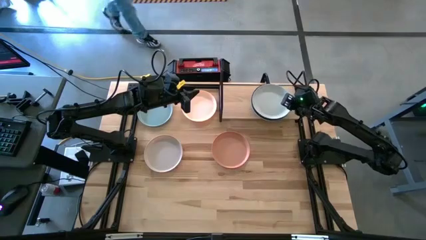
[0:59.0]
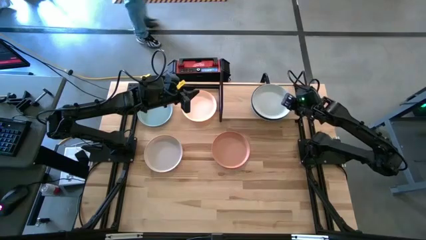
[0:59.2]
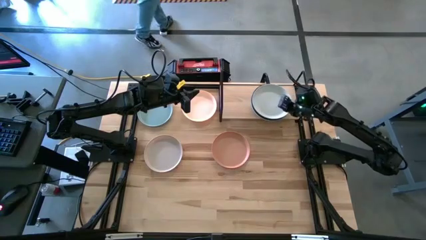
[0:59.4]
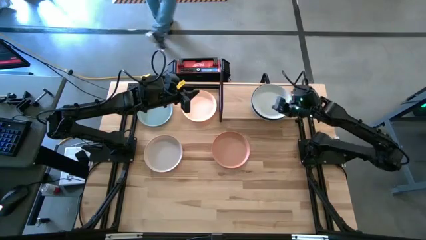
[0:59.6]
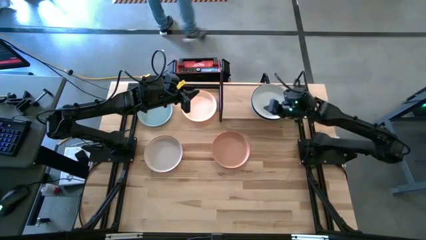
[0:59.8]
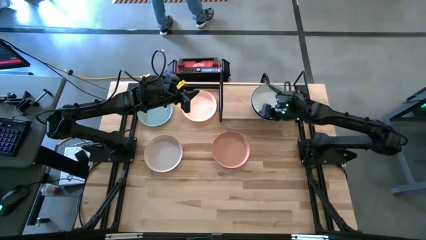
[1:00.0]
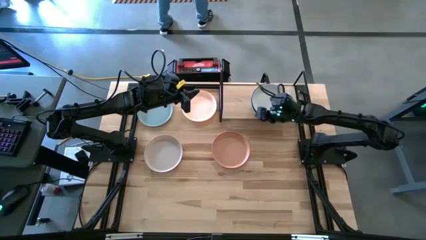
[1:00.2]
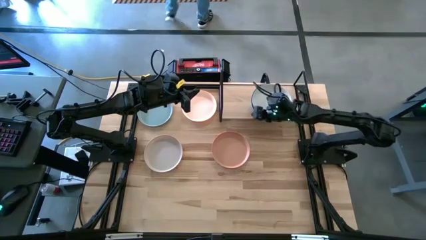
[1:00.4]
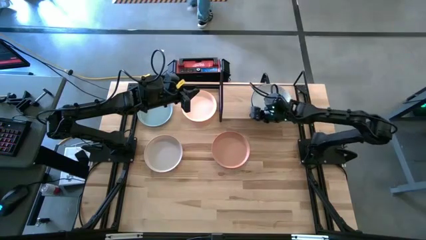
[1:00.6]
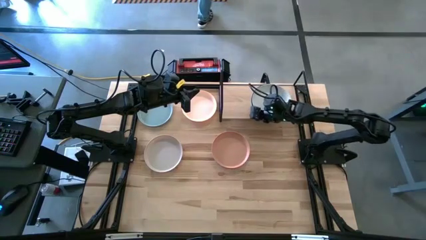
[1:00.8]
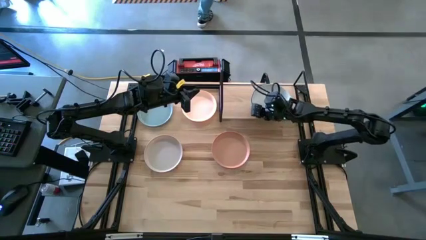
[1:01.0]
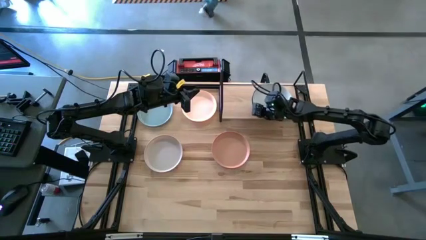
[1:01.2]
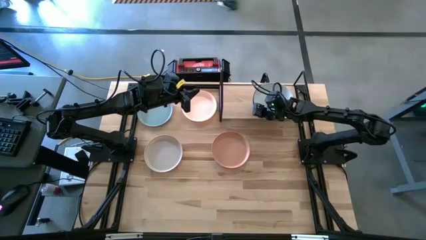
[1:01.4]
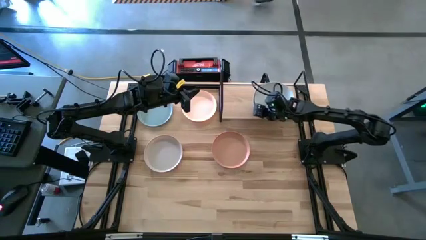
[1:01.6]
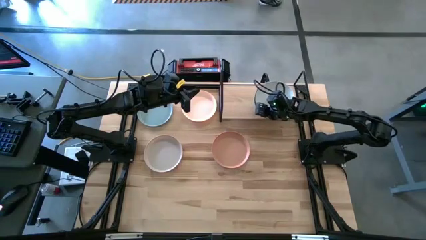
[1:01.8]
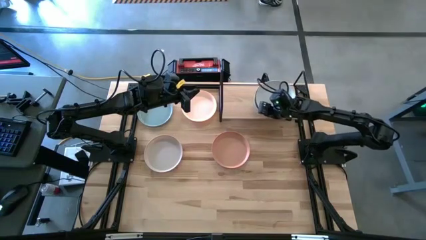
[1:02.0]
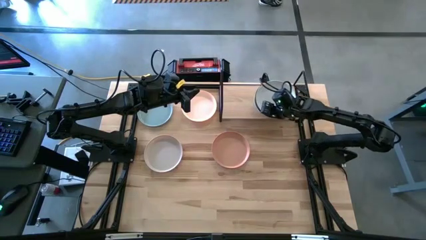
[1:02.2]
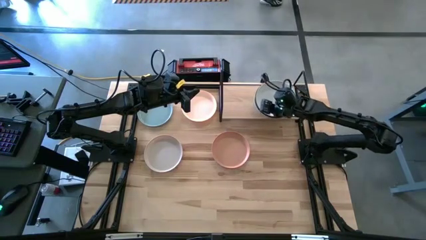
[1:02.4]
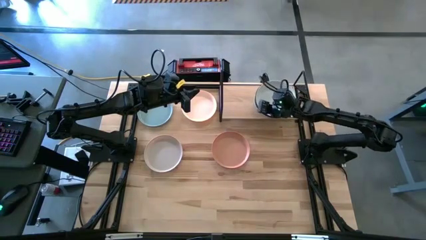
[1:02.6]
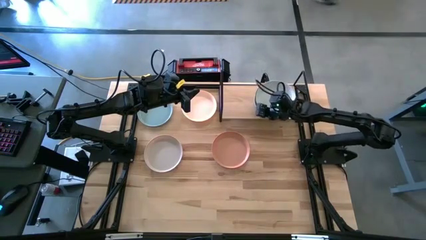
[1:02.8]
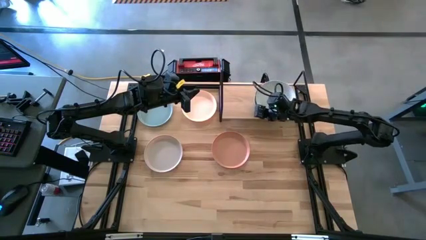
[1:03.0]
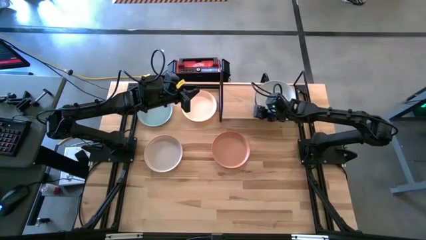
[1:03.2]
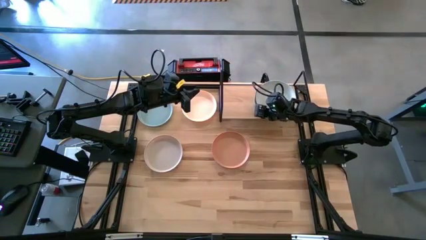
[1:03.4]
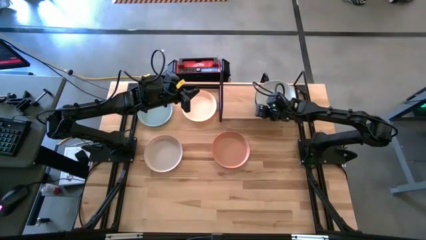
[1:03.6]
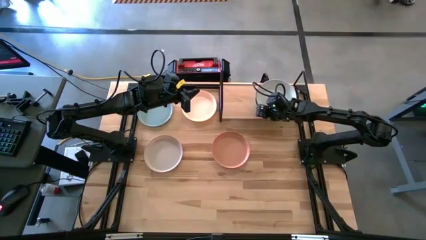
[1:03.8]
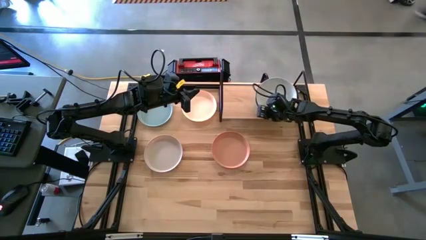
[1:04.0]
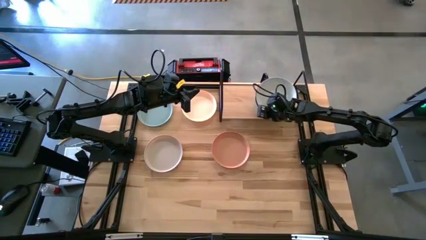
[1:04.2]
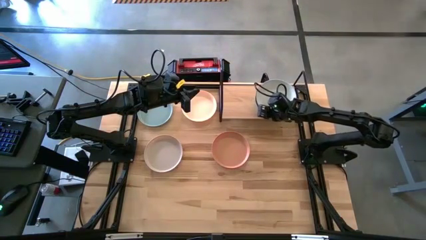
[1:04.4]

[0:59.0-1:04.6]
Task: Place and stack plates onto a shelf
Adjust the plates on the shelf

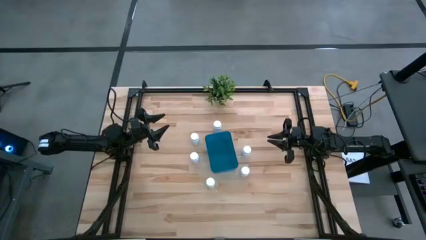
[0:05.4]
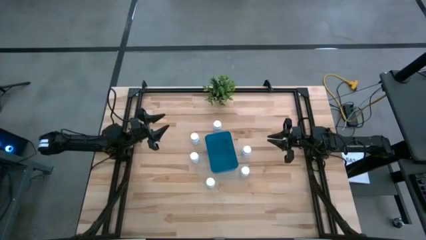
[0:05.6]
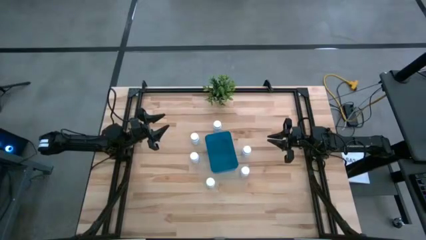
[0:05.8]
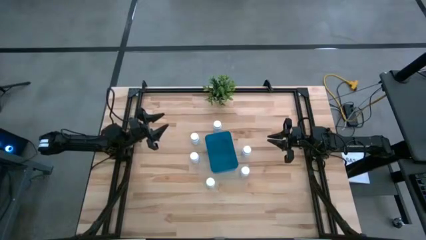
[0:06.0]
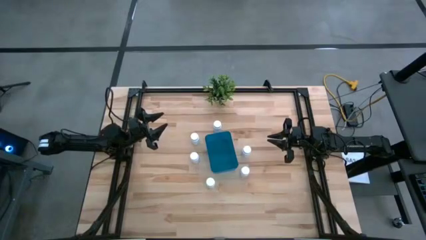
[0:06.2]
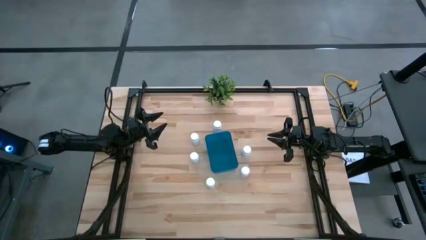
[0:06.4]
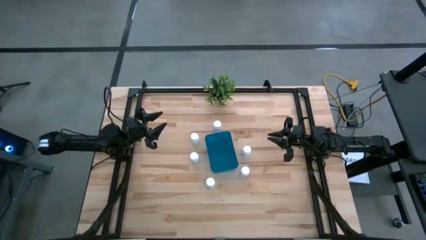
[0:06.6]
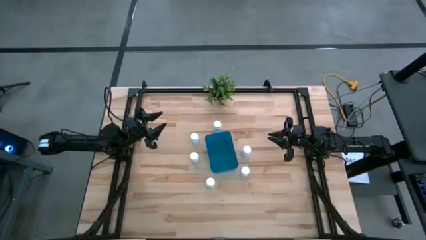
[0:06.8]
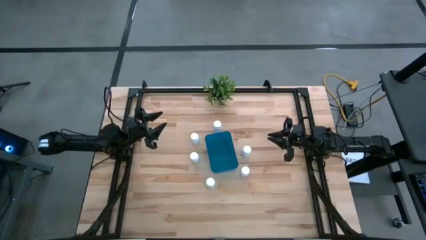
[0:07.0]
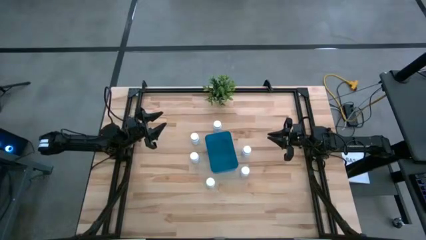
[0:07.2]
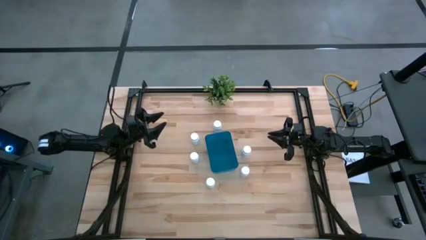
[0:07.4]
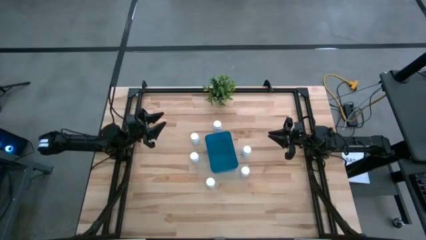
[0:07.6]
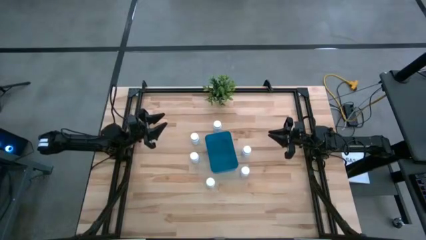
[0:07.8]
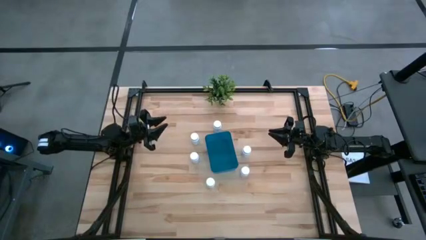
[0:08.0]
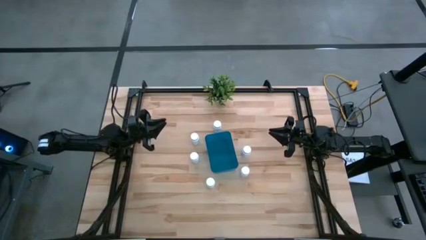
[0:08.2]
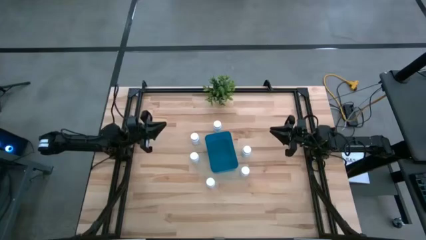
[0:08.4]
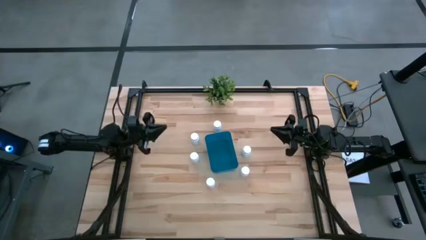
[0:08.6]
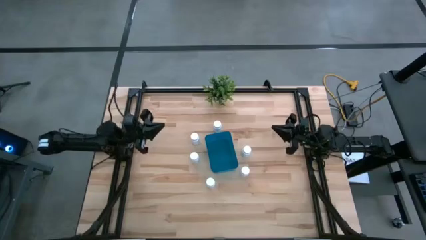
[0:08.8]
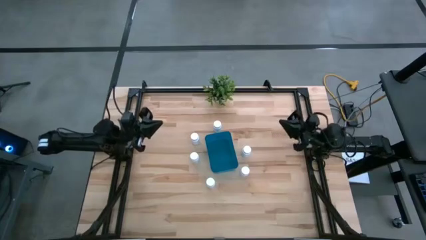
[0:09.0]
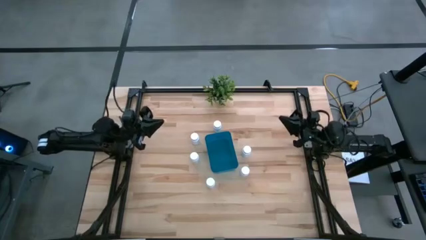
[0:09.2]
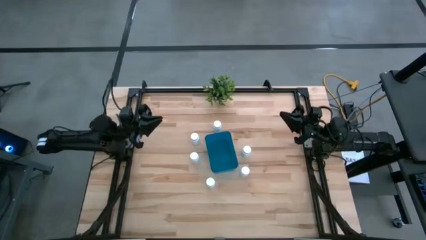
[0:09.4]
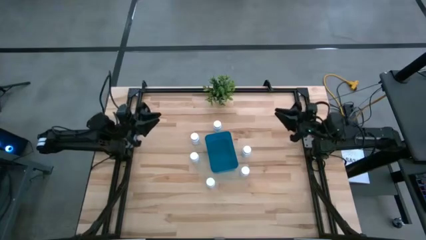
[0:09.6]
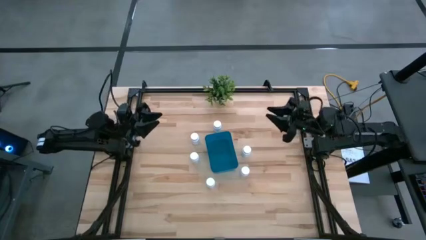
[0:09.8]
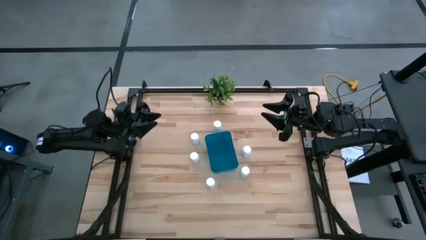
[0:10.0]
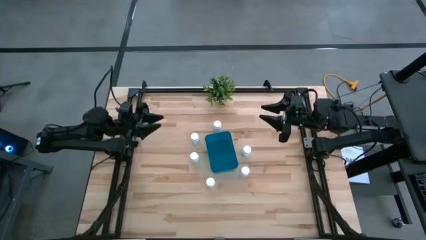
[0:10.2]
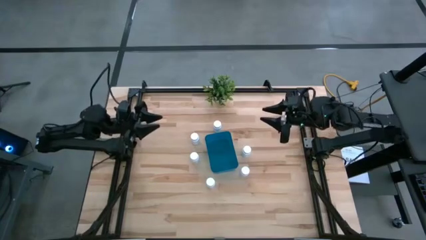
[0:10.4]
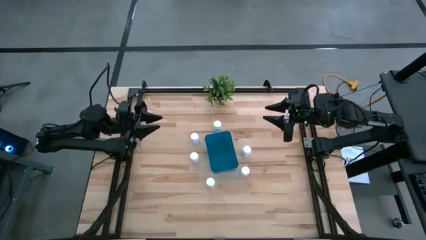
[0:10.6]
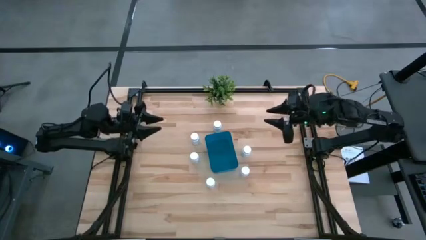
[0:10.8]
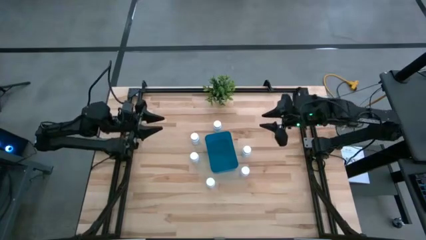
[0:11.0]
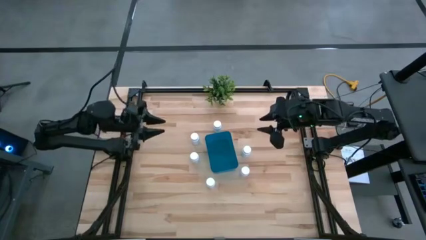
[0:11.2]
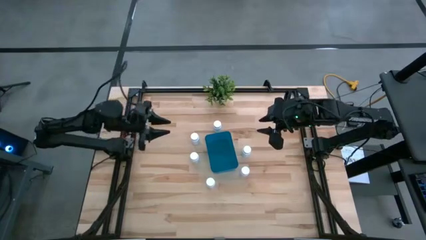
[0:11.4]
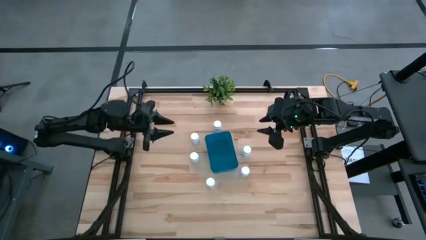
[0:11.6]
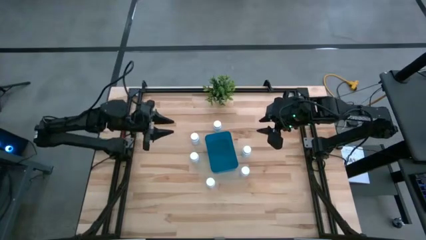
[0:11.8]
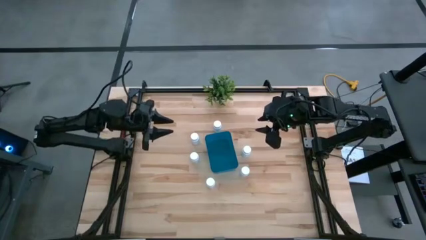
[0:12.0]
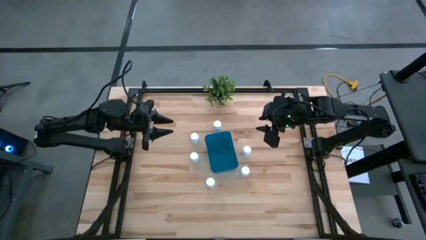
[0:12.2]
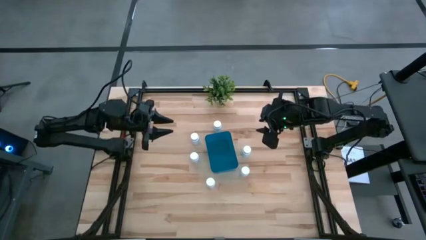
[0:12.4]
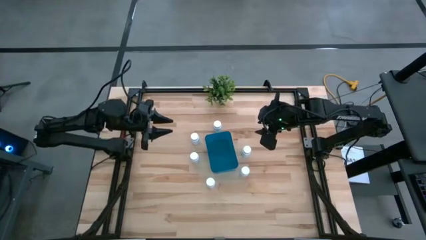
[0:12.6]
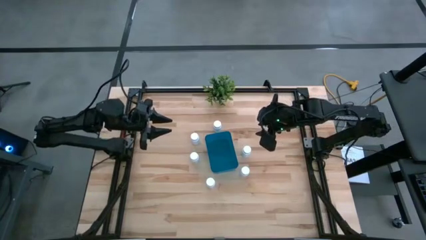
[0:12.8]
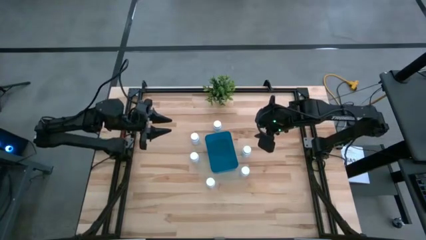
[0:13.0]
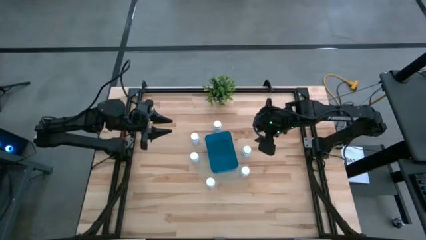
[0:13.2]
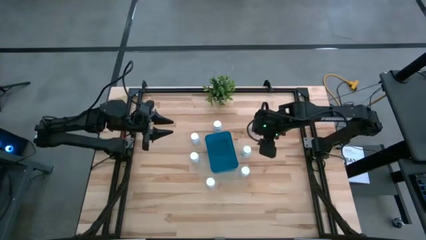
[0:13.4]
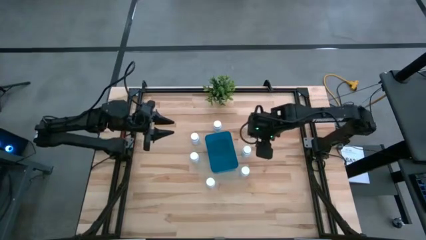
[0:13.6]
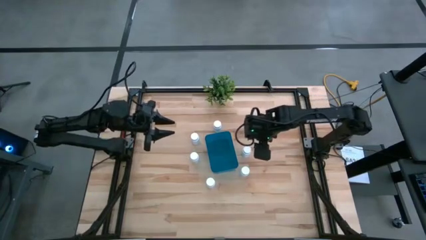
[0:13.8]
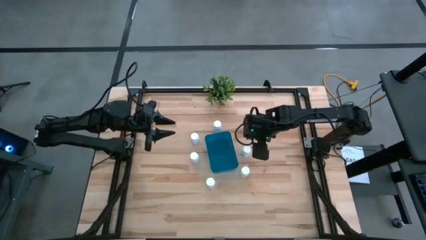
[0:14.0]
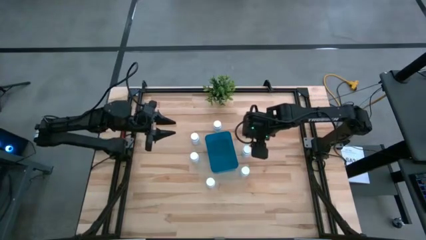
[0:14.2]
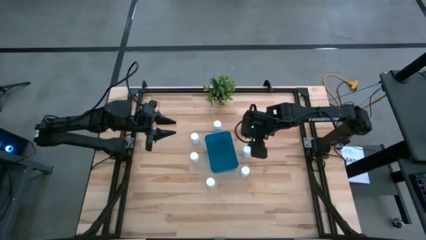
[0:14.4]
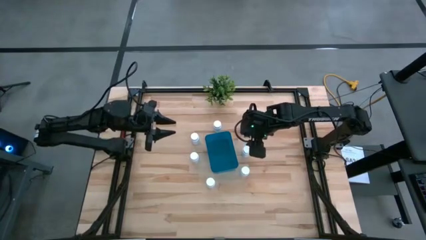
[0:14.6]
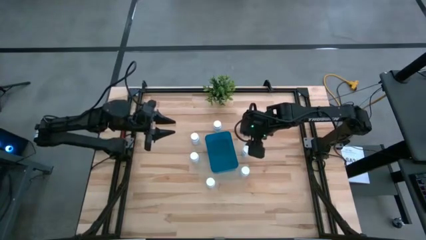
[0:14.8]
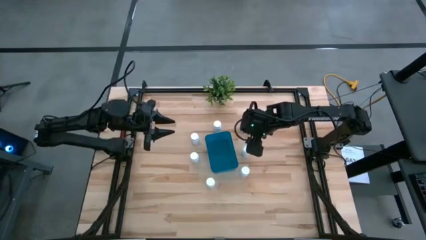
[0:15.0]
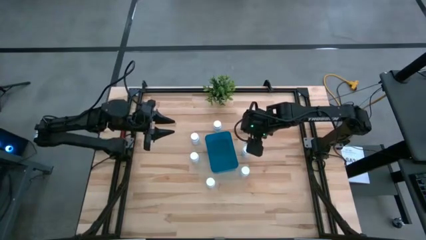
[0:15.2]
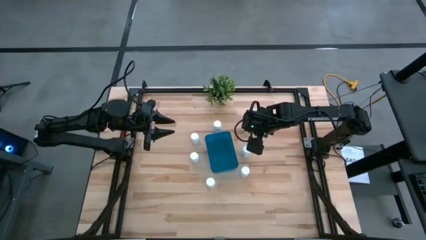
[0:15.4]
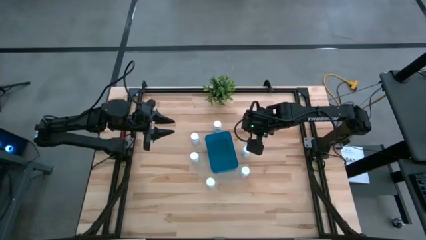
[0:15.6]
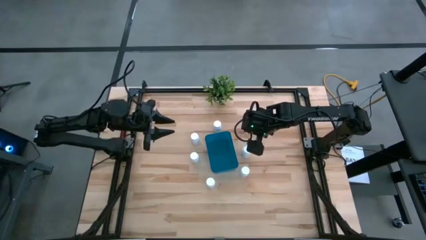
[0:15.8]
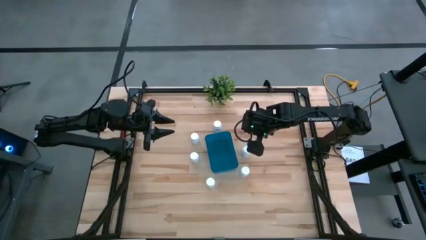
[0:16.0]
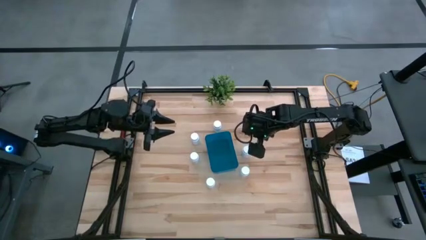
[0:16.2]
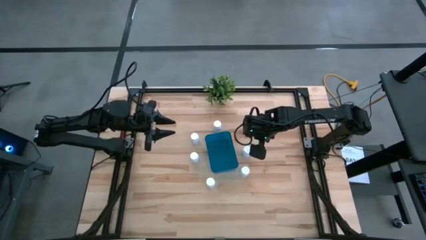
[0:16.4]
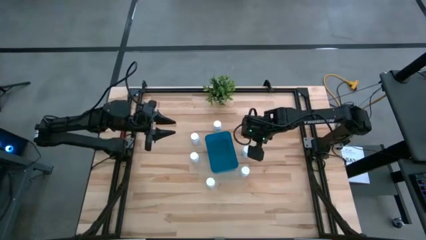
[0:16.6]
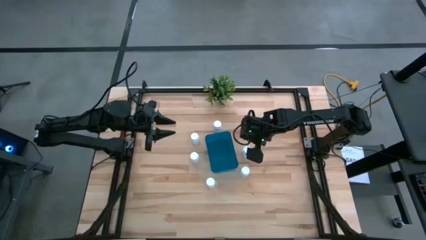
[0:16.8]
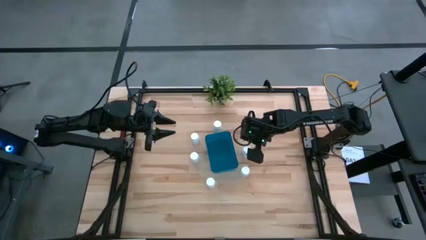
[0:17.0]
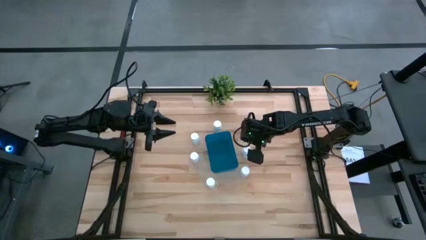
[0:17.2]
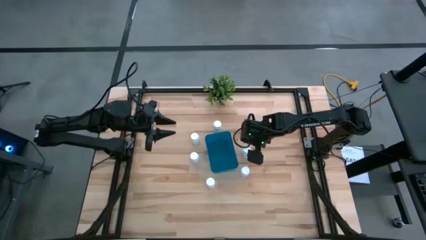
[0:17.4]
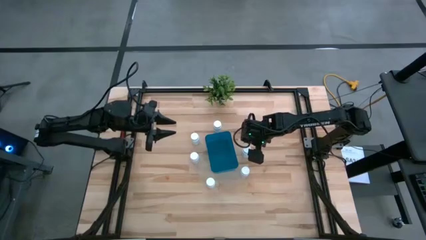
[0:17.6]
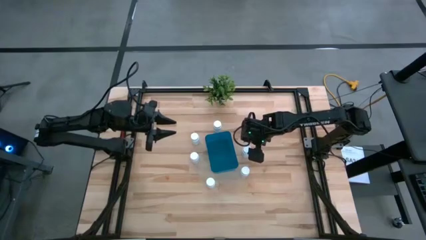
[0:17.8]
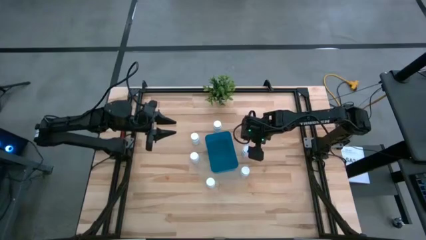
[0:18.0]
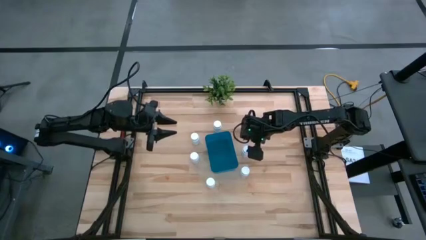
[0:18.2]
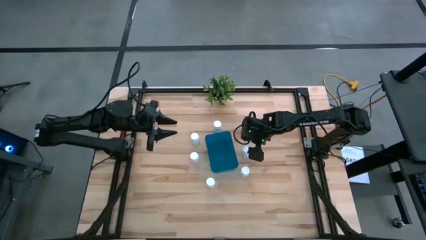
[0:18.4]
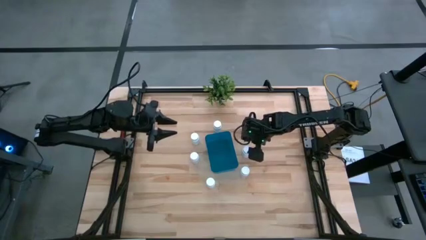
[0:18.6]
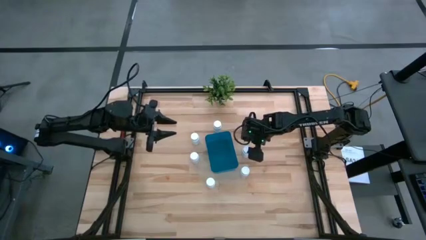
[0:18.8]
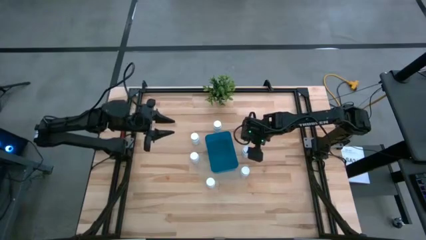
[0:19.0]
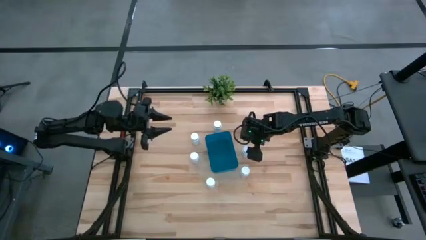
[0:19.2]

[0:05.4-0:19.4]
Task: Pick and place pill bottles into a basket
Put the white medicine bottle into the blue bin
